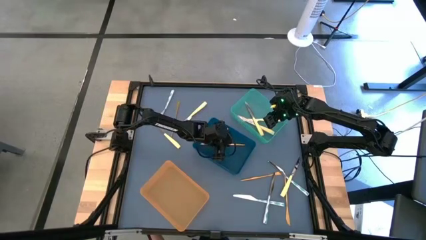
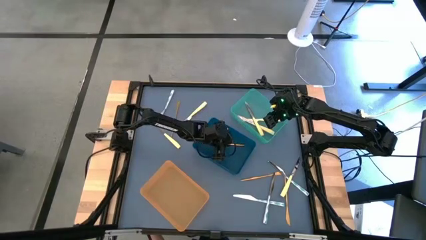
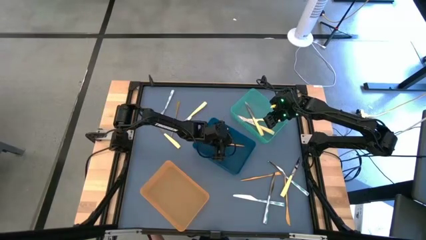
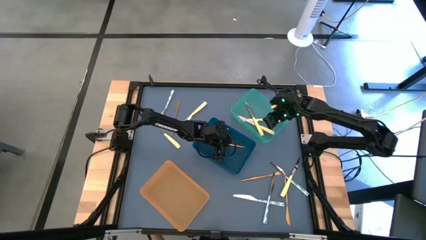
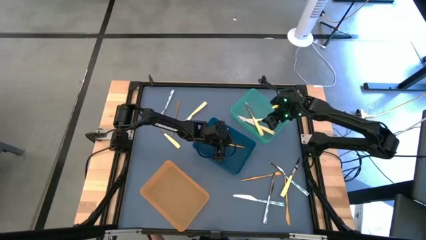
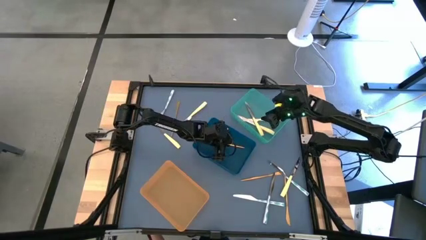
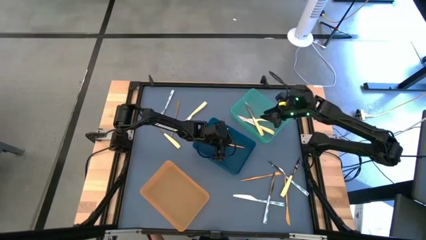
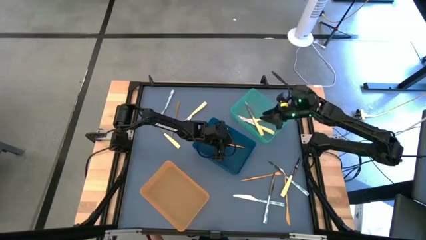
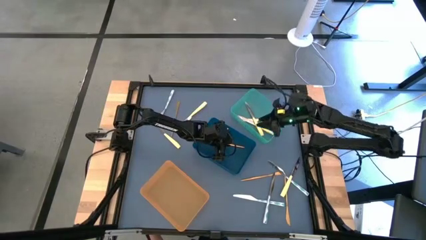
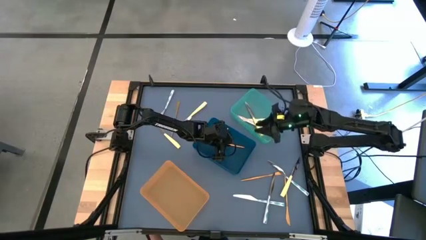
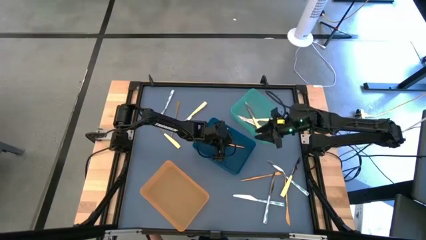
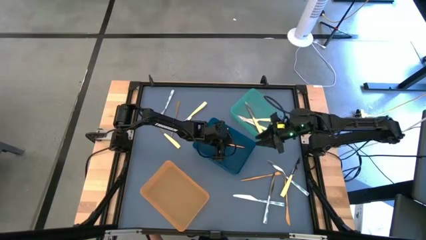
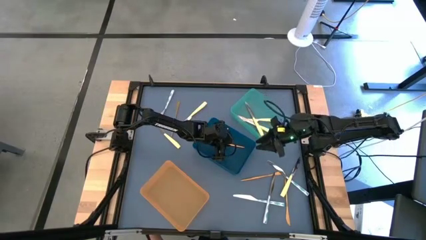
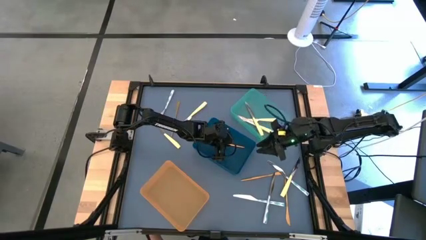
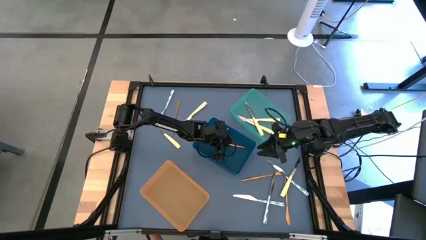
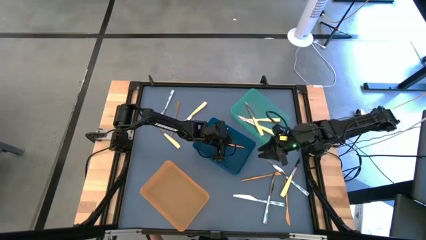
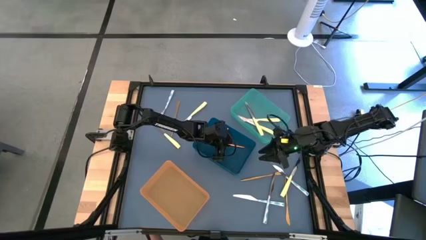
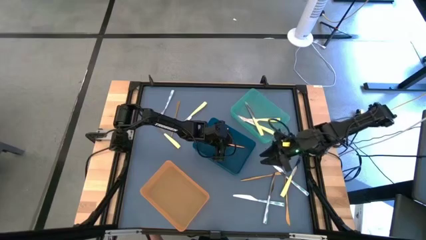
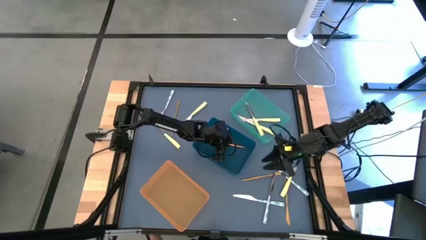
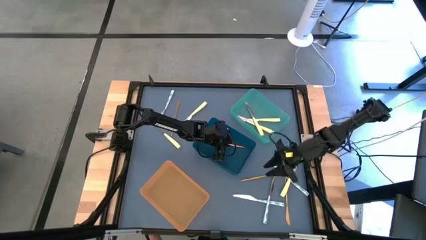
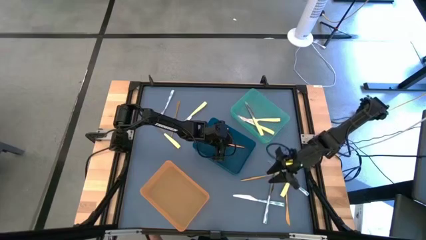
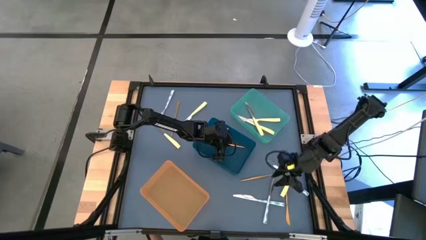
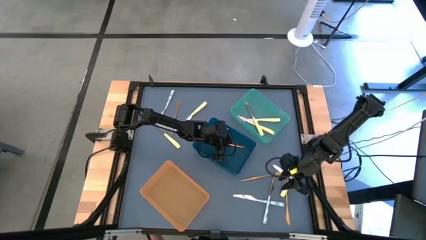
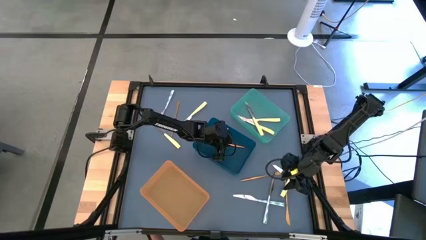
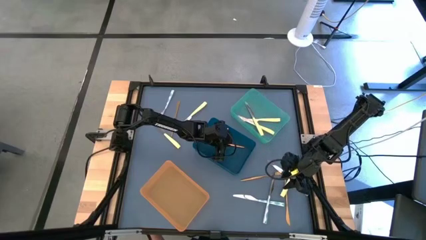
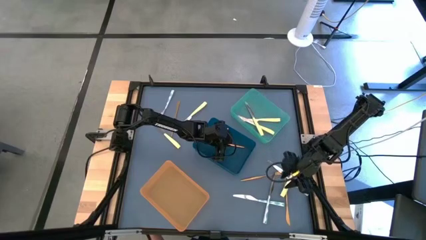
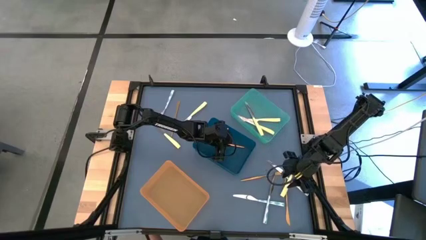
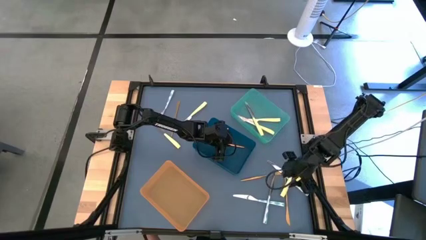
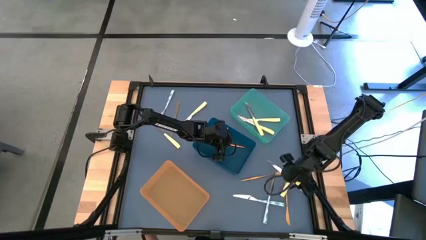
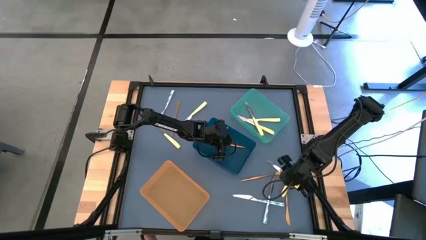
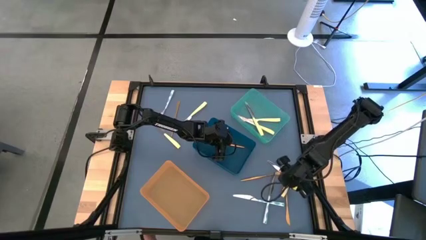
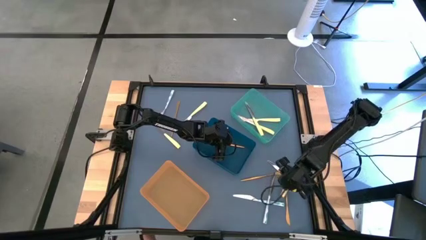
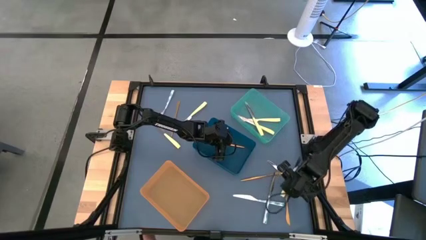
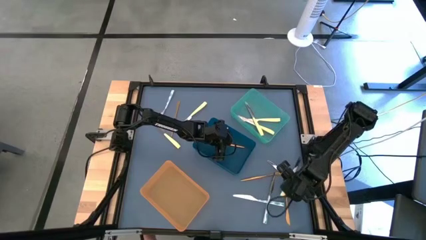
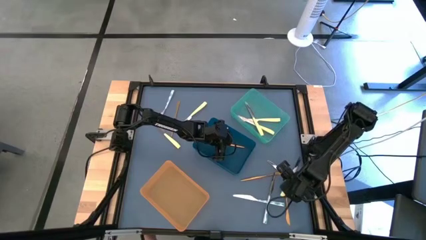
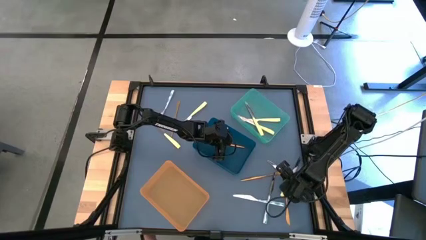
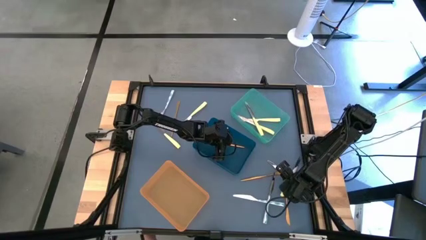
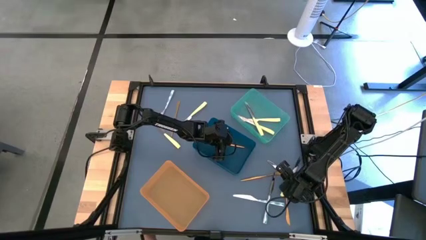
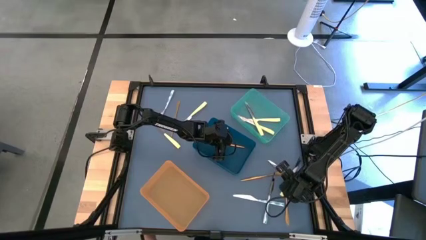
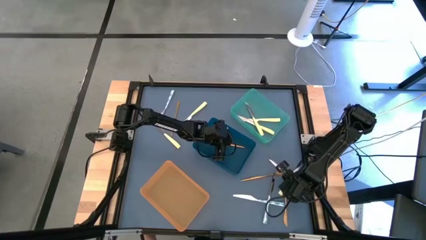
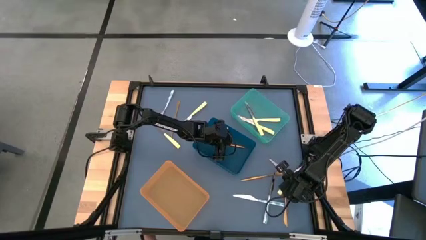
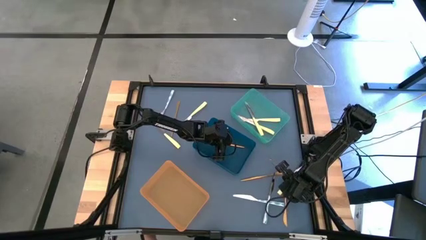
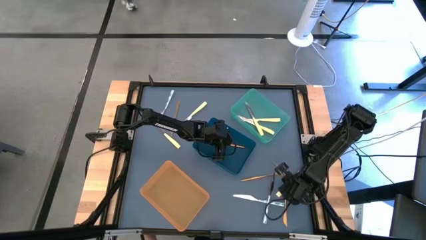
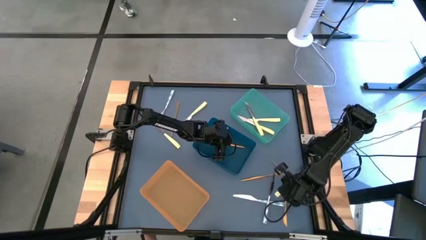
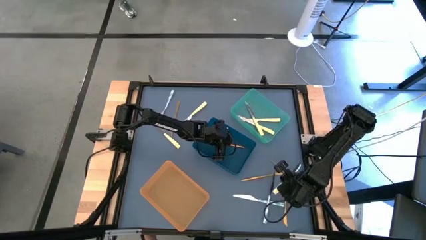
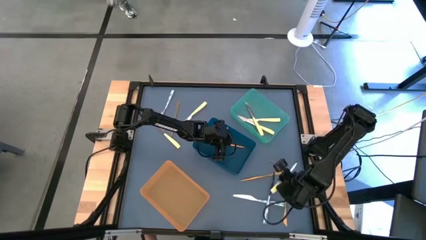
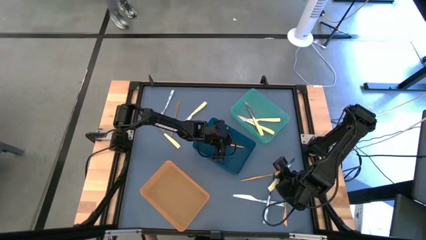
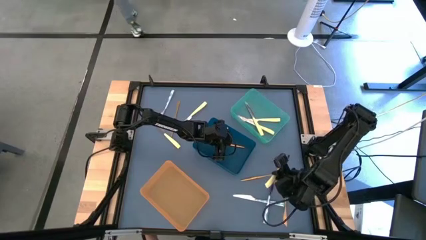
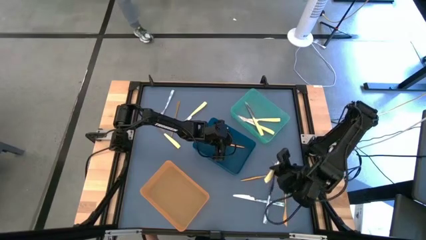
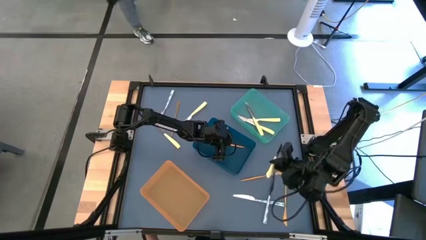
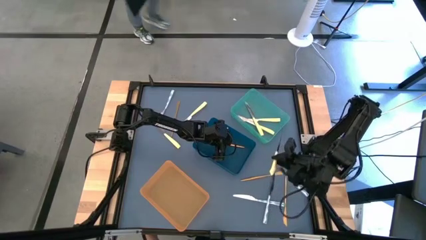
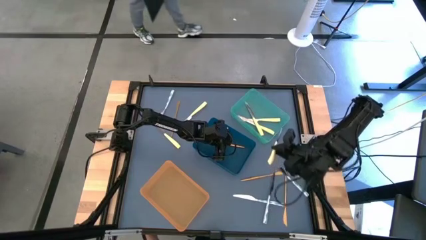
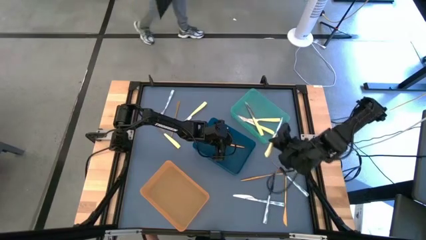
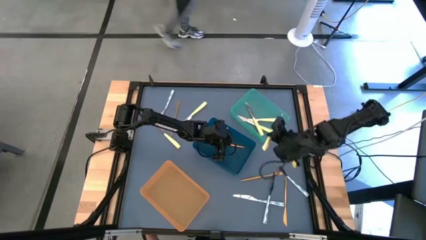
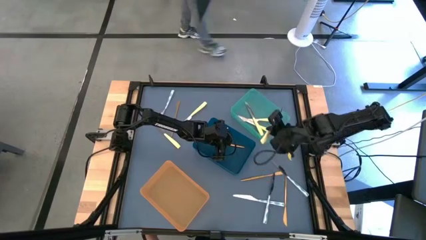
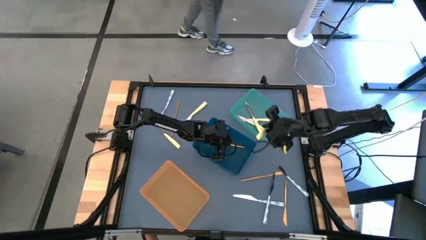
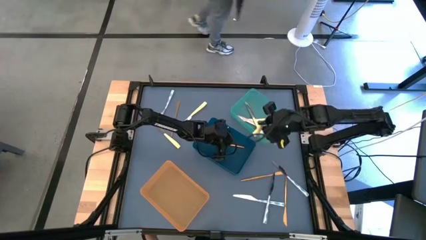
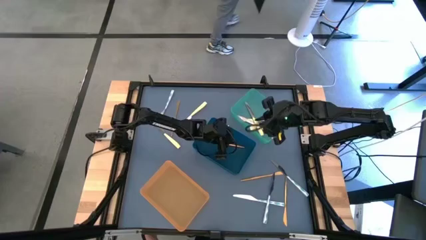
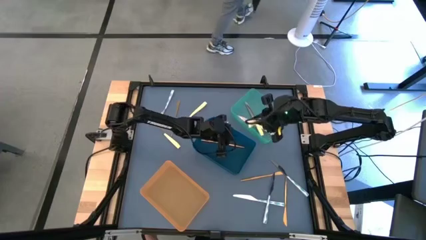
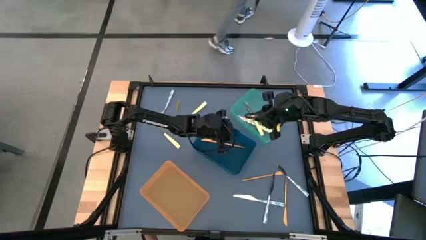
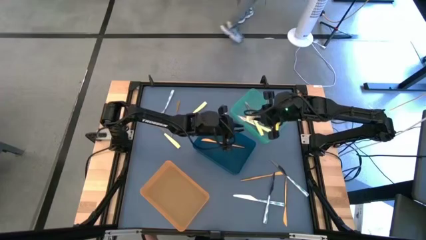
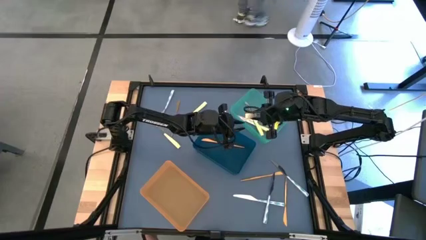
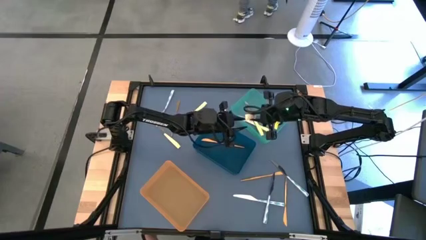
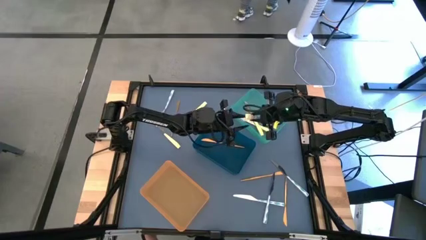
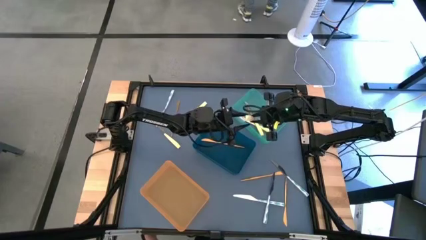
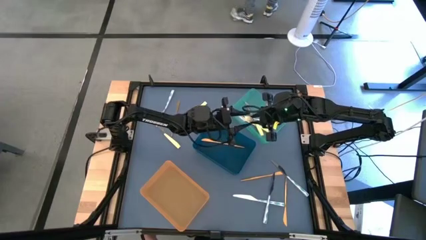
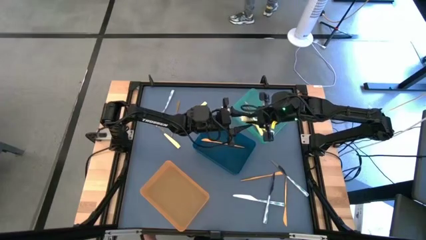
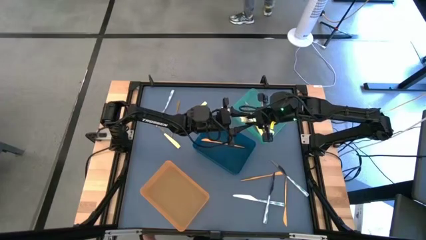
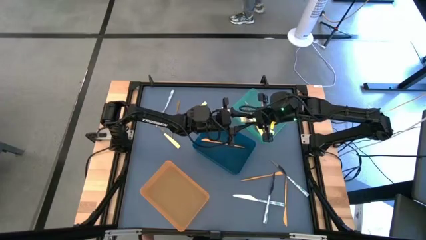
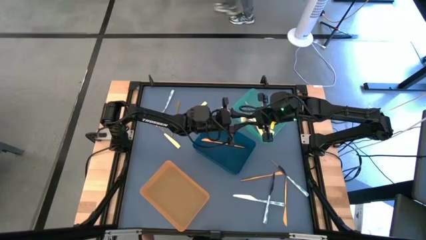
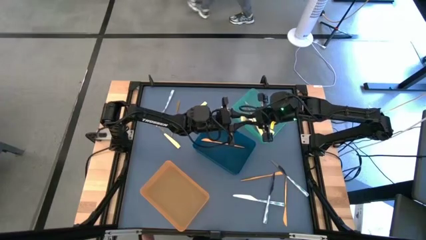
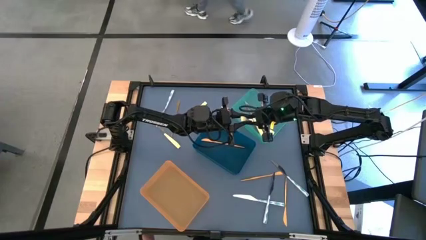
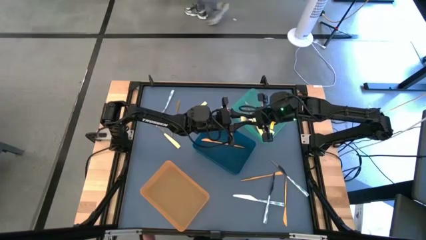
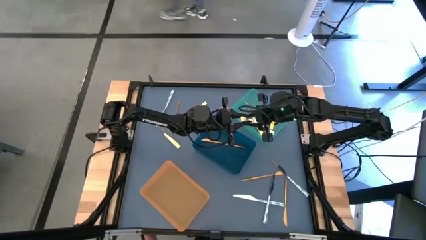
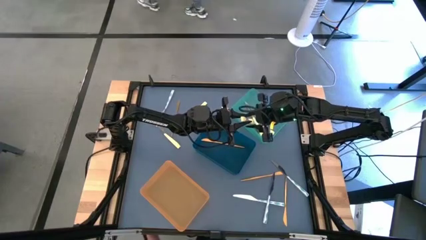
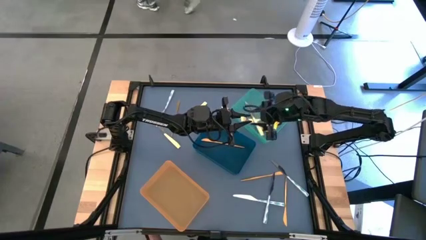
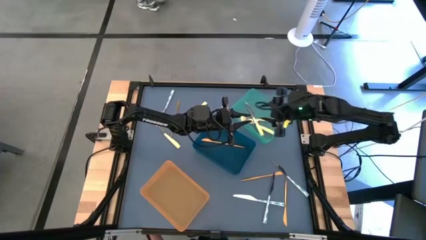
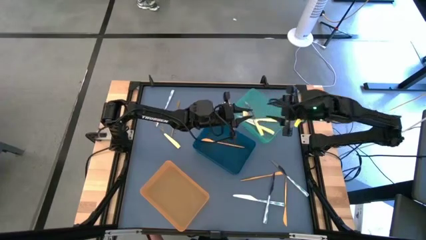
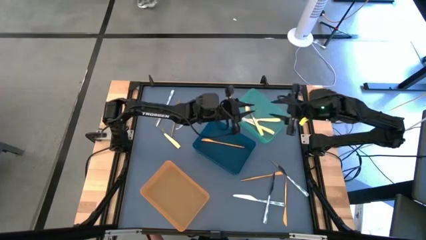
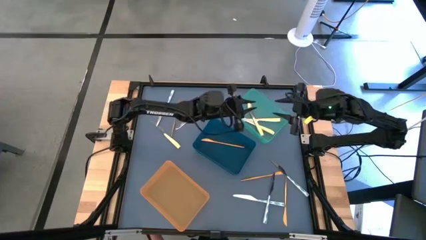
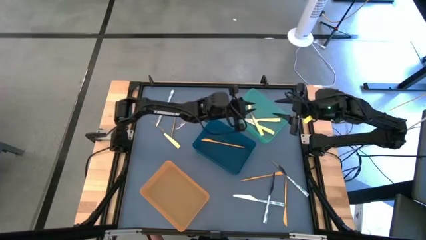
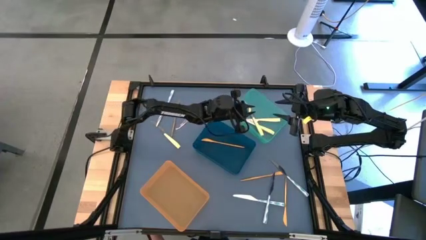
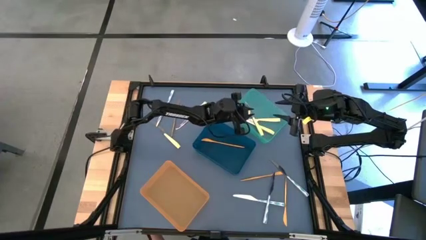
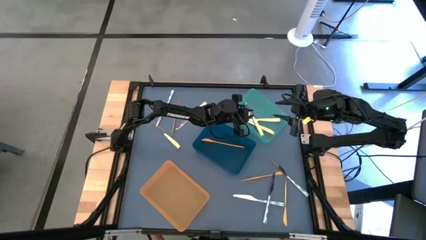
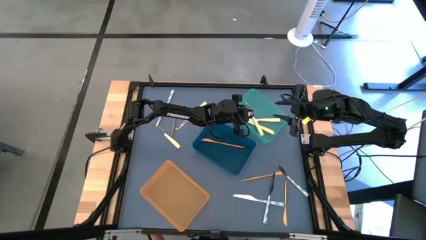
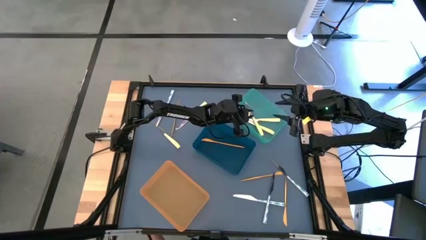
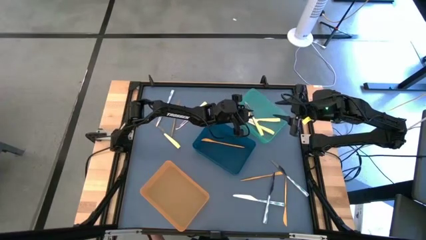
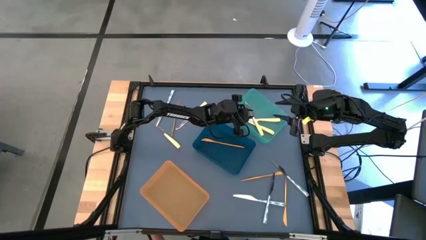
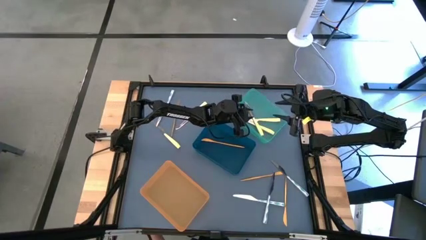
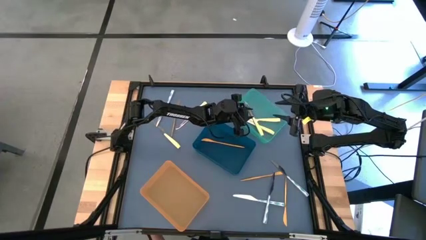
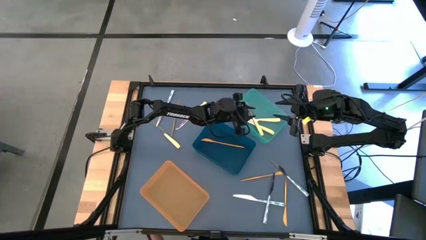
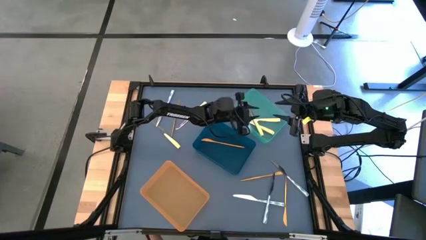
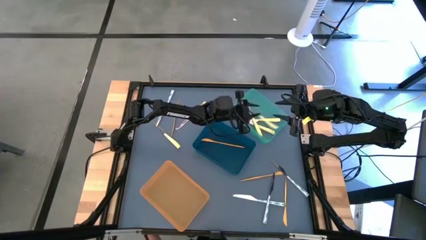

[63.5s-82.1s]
Task: Sort silverware by color (type)
Put the left yellow knife into the light blue bin
